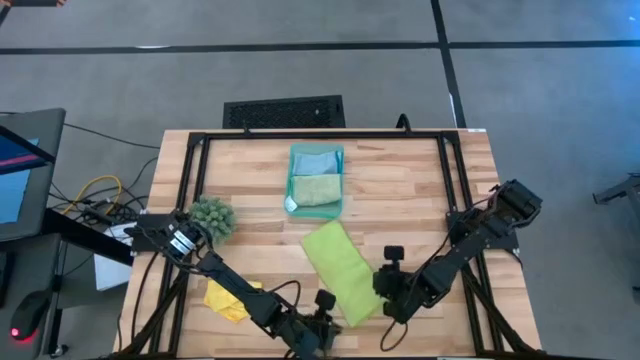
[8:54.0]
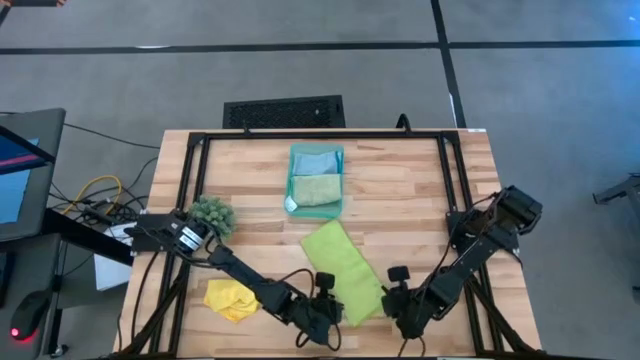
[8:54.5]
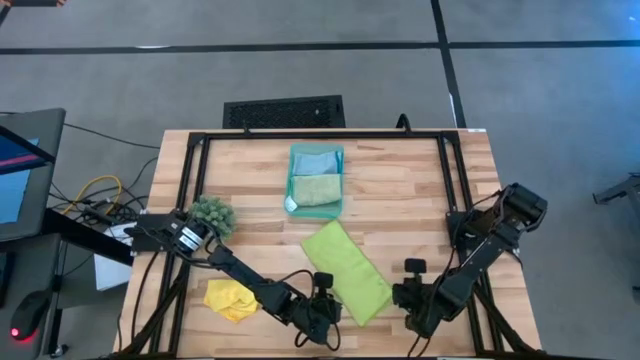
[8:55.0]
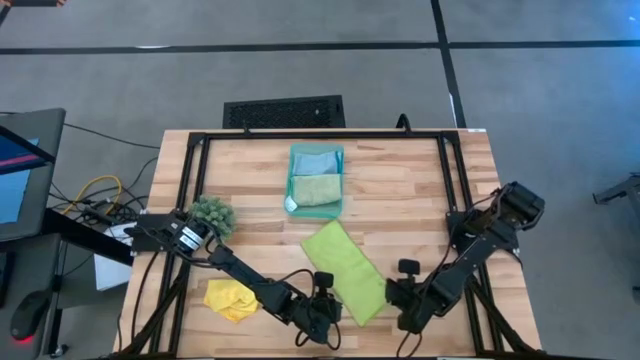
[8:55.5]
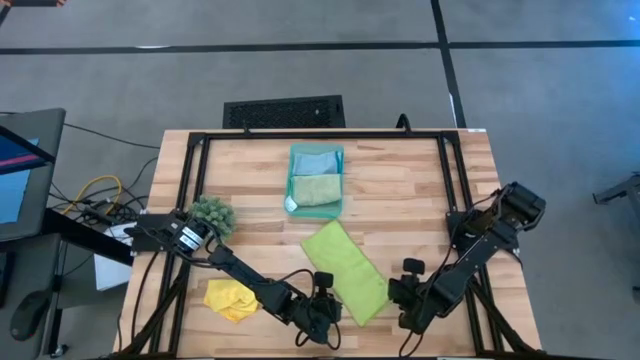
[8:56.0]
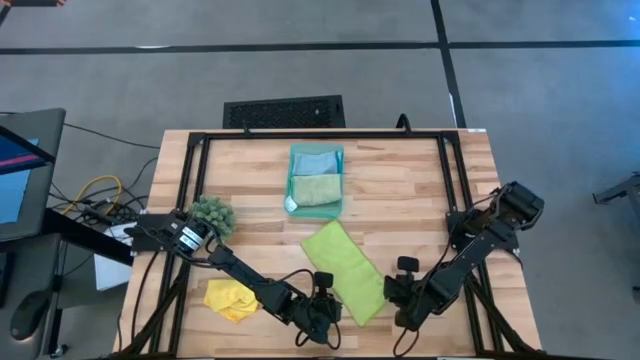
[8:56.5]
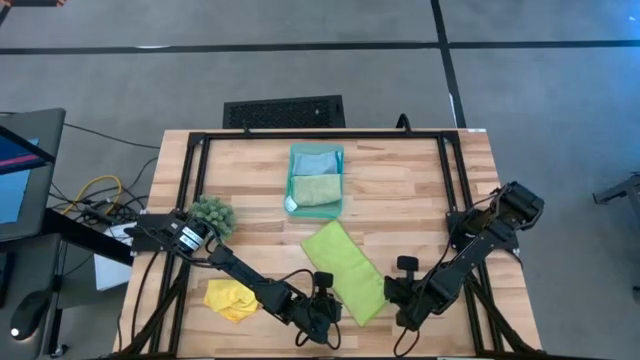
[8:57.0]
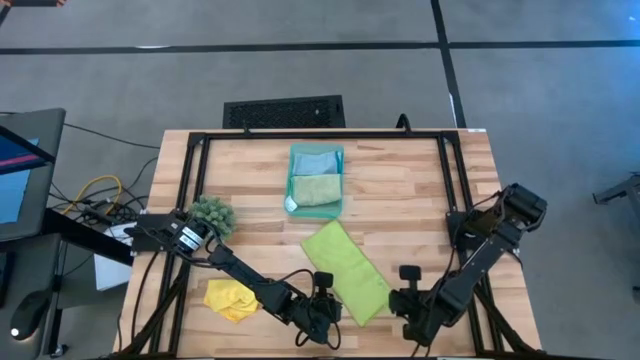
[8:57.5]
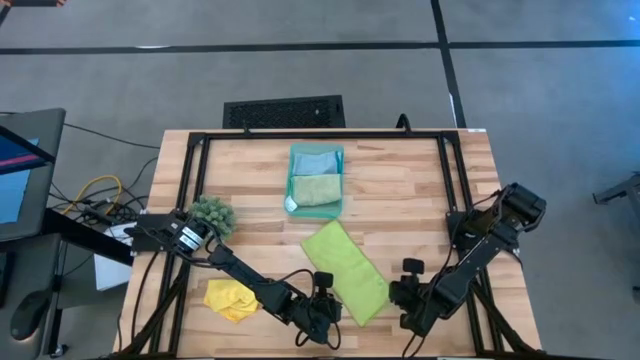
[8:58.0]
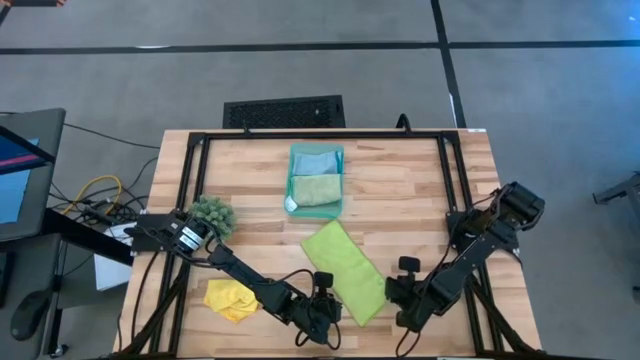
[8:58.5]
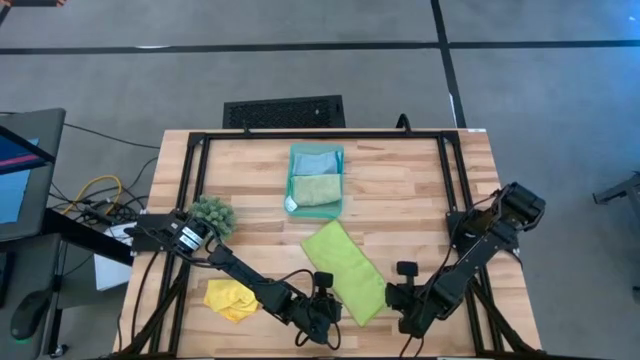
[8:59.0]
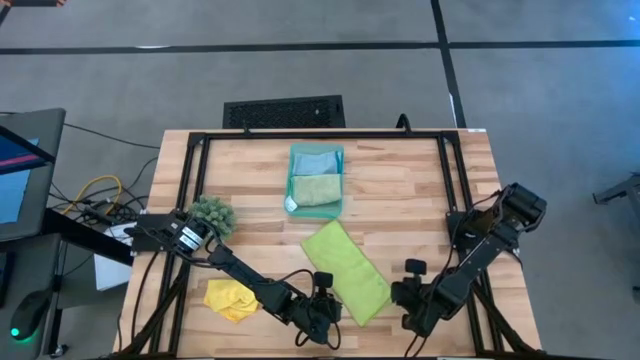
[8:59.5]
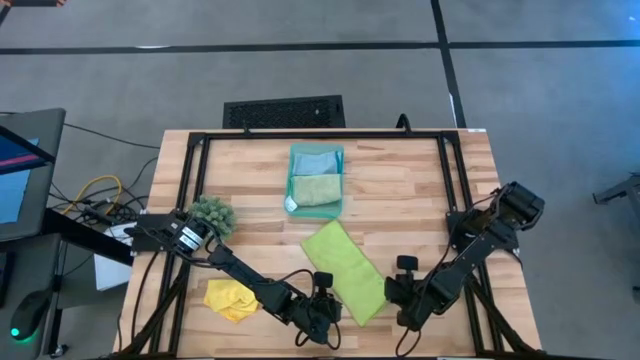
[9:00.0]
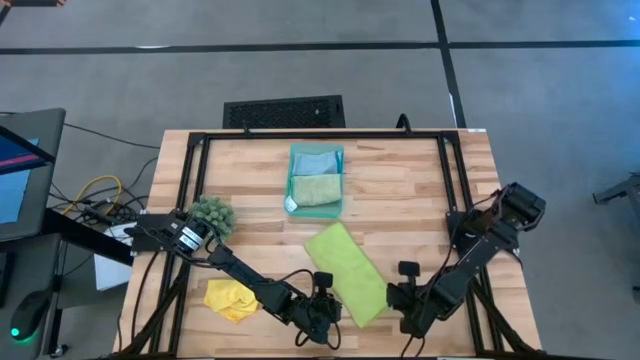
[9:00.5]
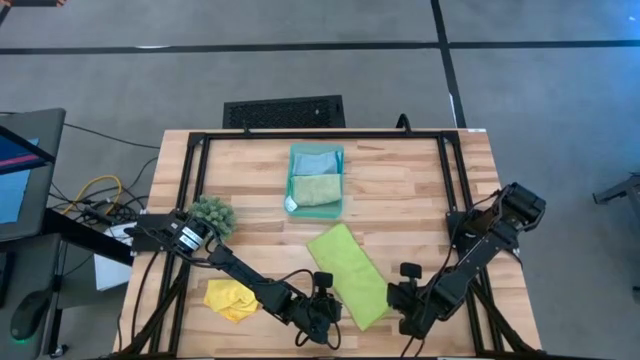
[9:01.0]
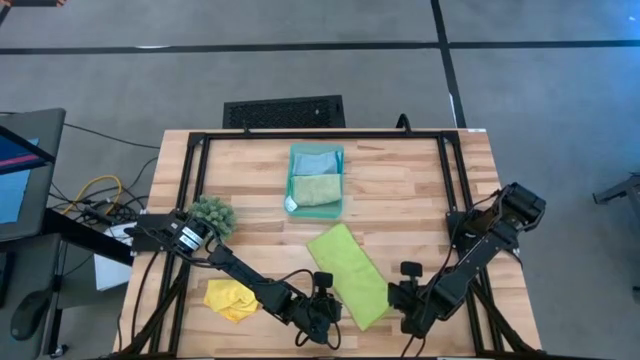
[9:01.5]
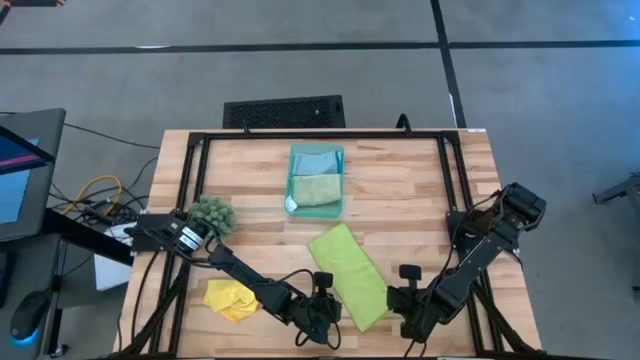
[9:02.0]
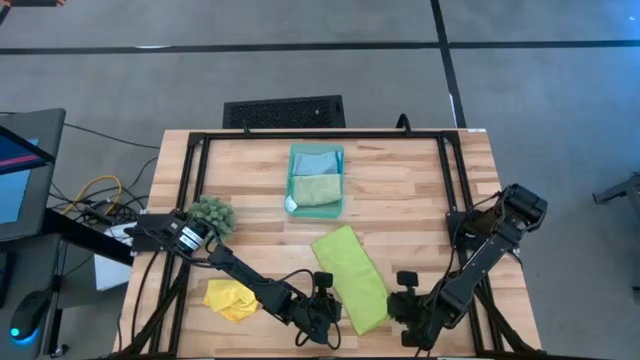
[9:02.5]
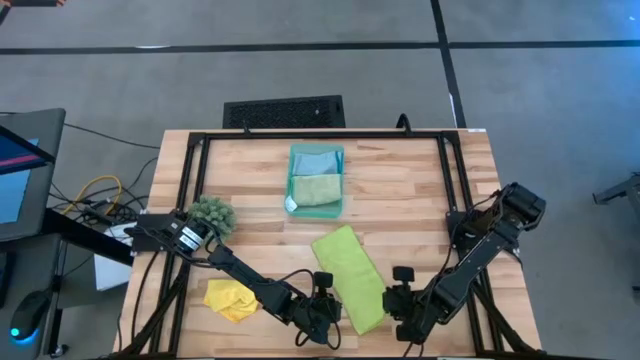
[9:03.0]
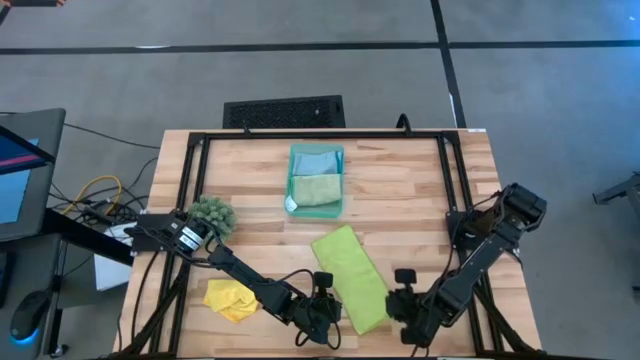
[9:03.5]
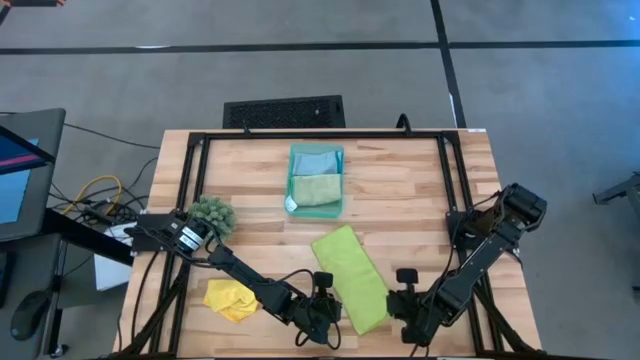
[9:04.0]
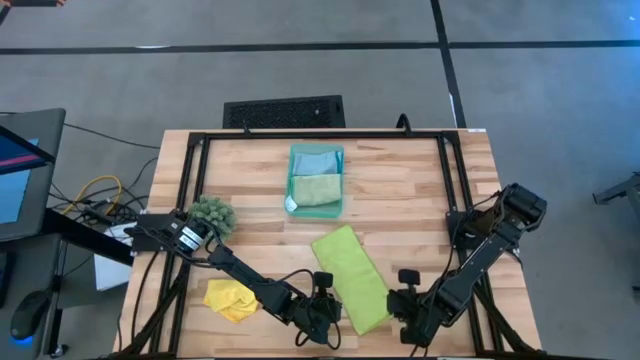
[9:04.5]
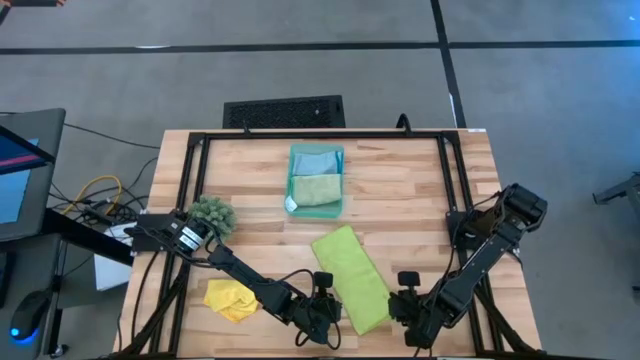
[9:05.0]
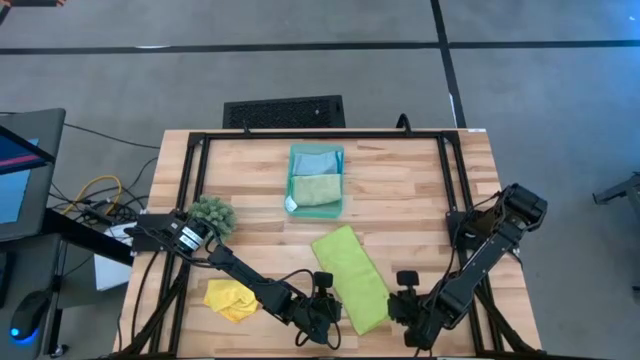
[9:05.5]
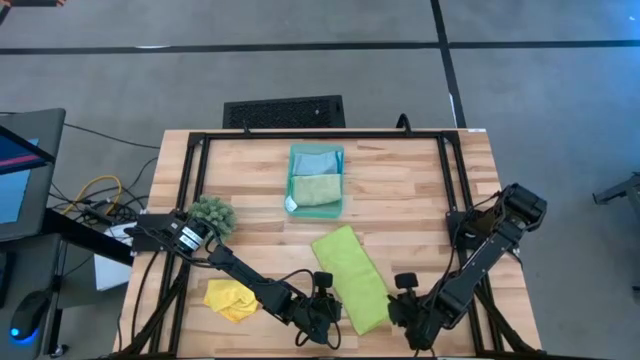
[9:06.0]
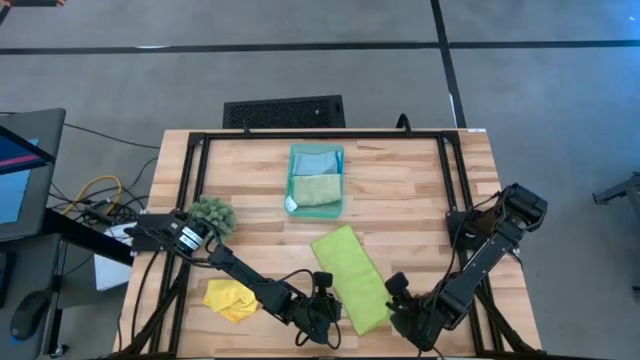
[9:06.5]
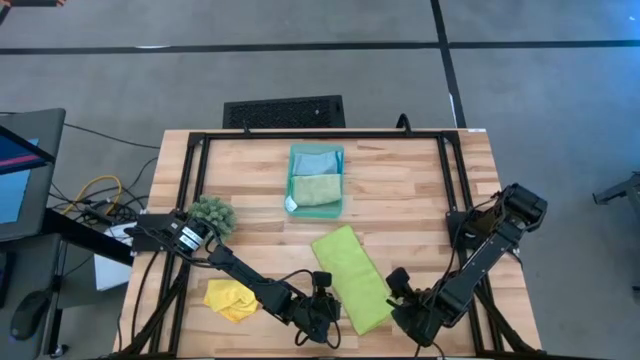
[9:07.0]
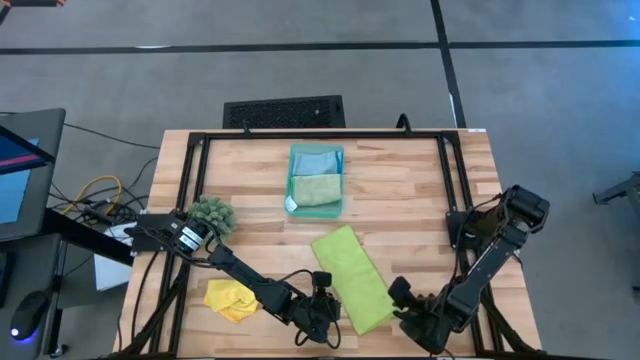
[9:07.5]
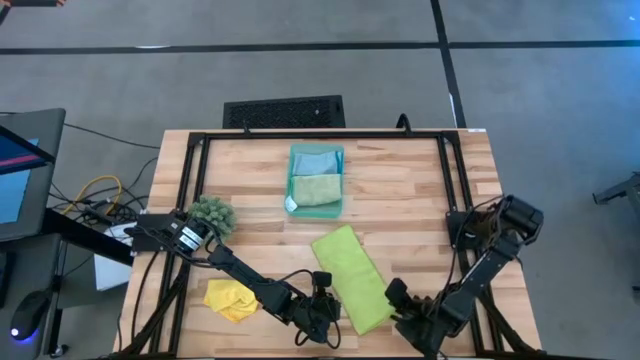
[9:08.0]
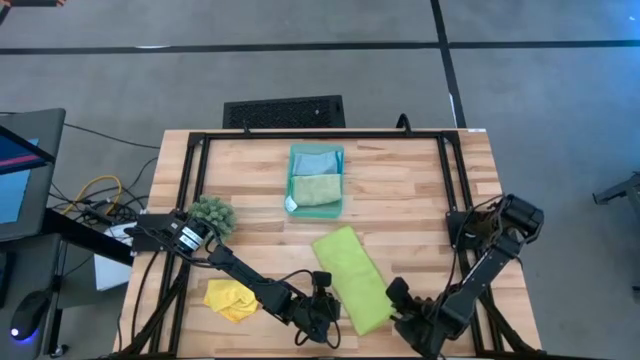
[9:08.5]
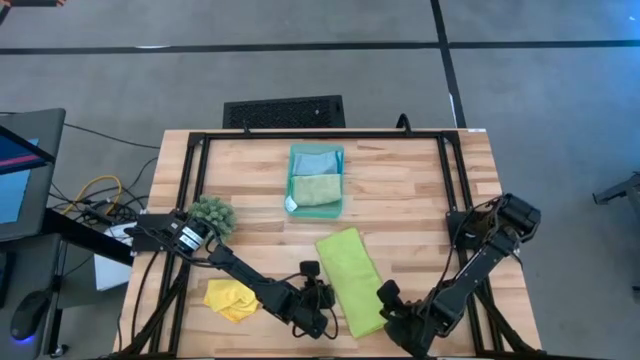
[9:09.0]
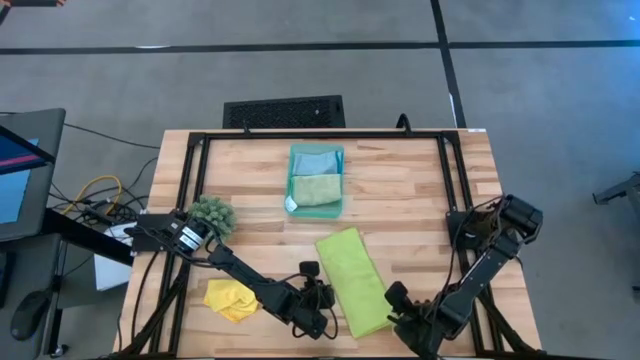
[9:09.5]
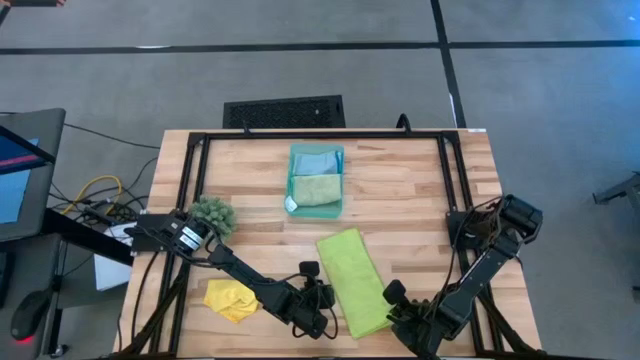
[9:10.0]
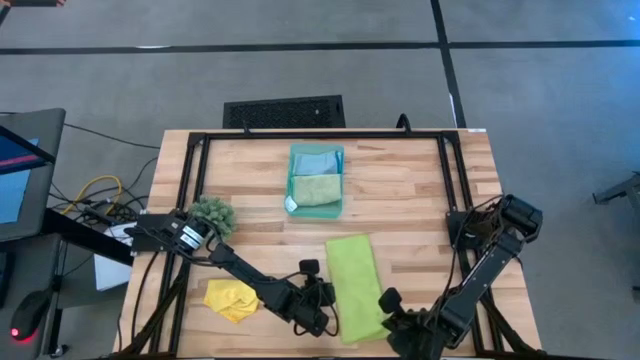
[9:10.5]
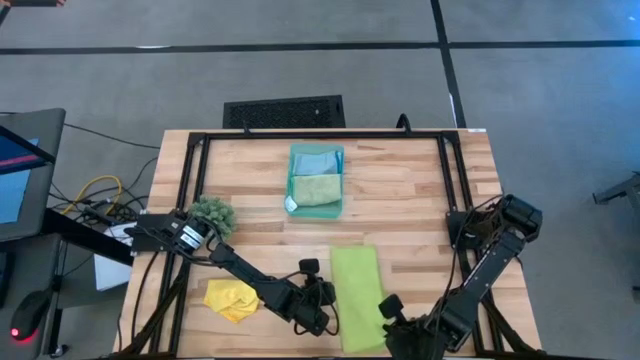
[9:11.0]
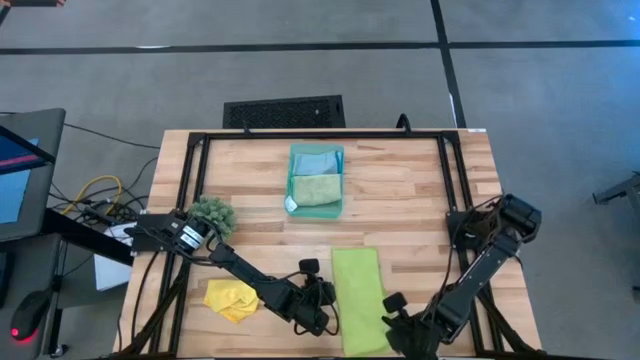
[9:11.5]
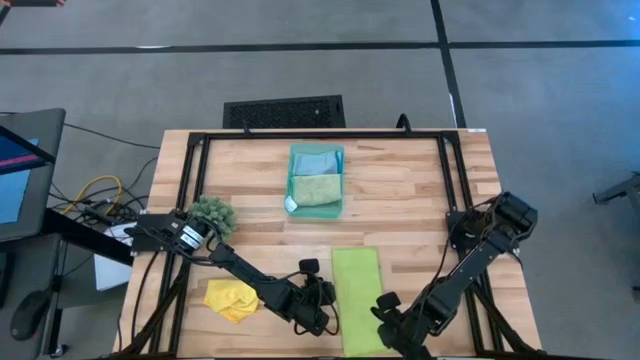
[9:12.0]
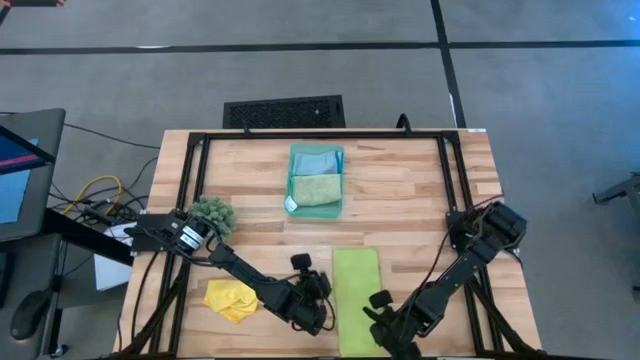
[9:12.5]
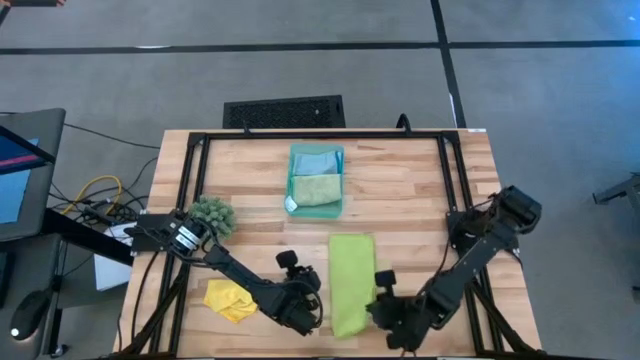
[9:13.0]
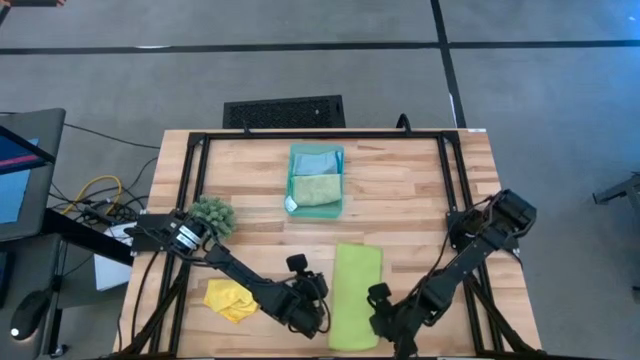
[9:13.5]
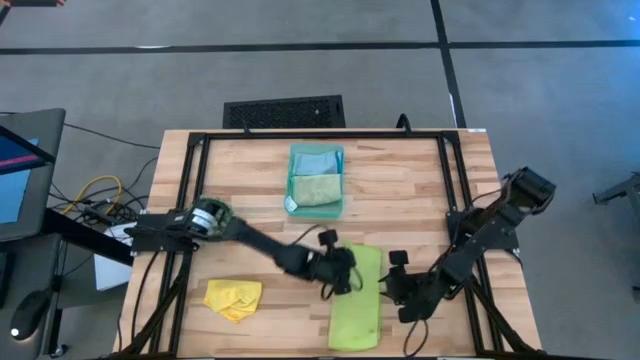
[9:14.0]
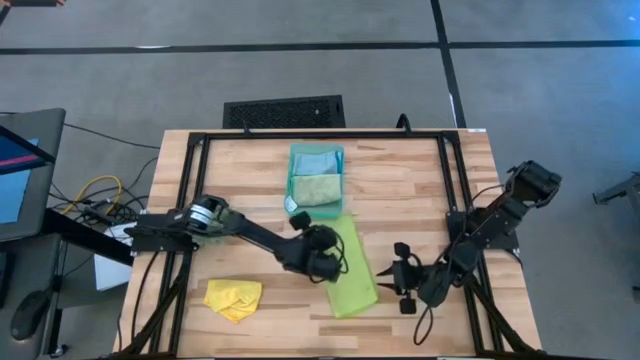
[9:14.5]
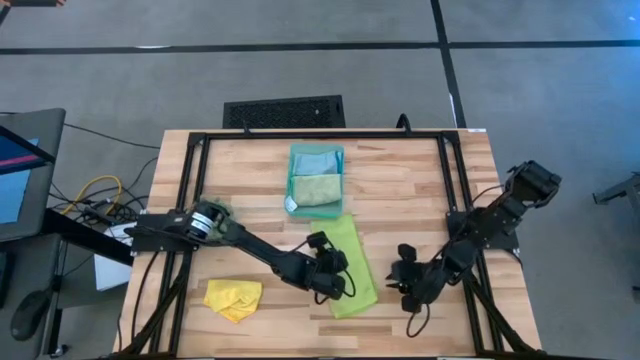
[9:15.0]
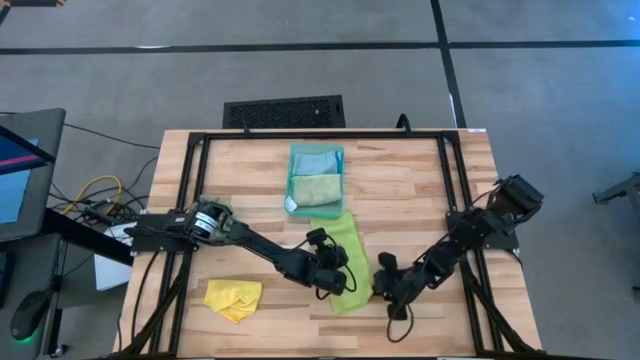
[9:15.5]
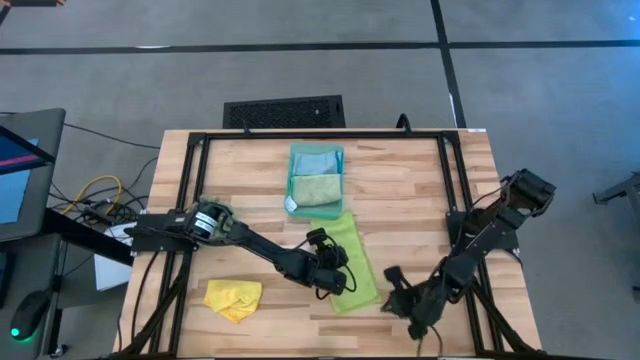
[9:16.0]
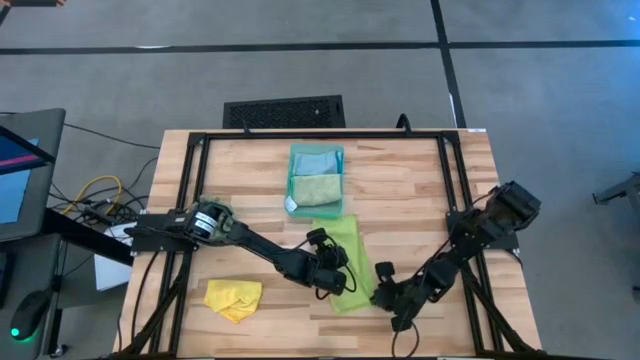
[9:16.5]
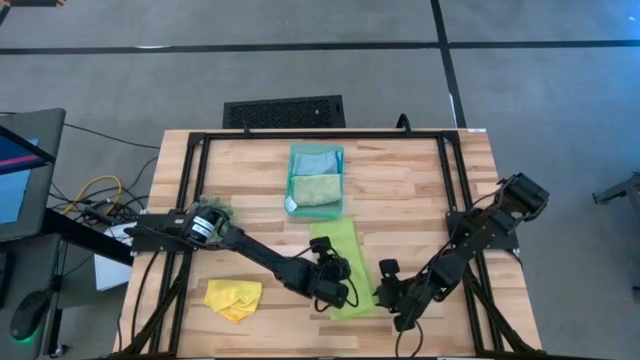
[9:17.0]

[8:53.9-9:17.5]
Task: Fold microfiber towels
Fold the light green microfiber cloth
